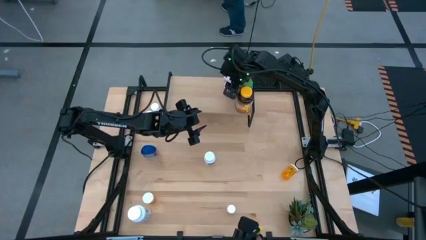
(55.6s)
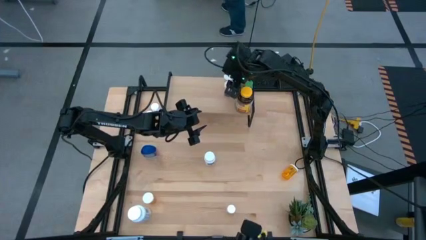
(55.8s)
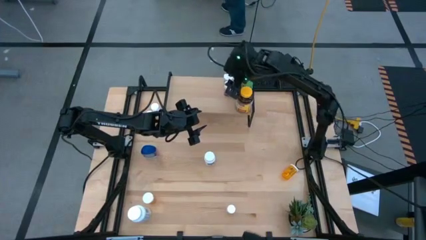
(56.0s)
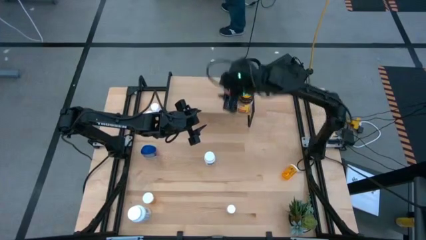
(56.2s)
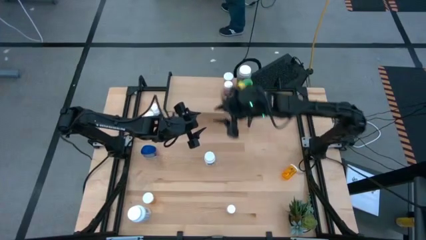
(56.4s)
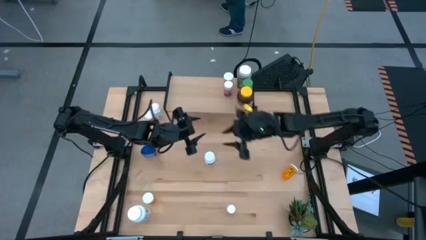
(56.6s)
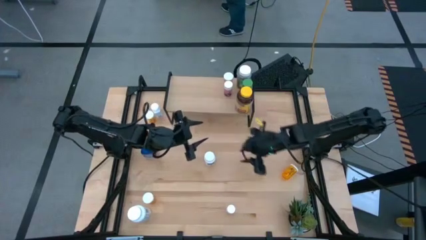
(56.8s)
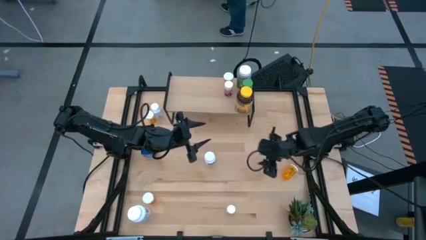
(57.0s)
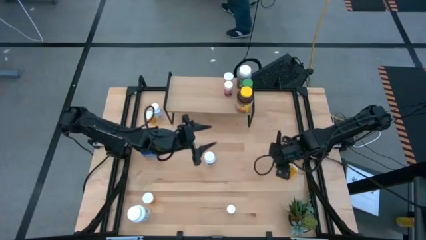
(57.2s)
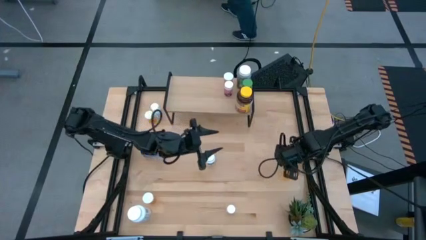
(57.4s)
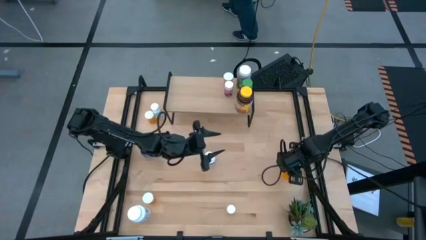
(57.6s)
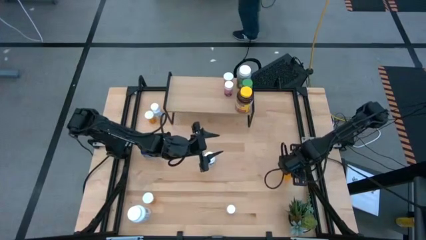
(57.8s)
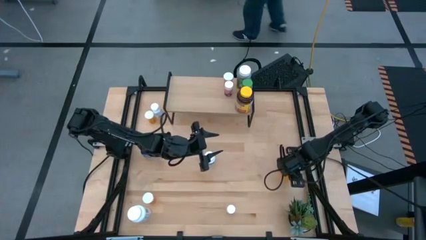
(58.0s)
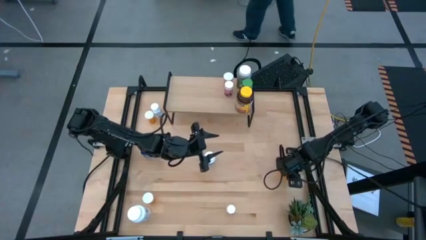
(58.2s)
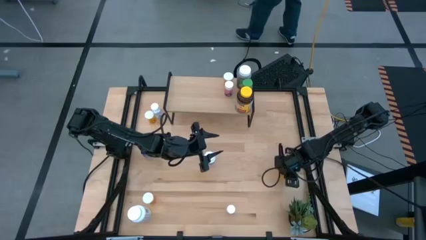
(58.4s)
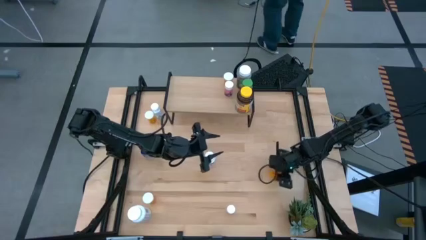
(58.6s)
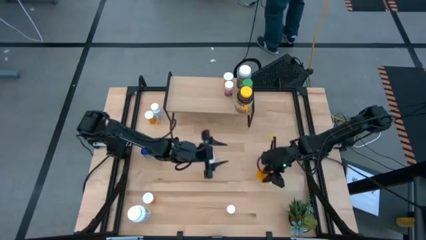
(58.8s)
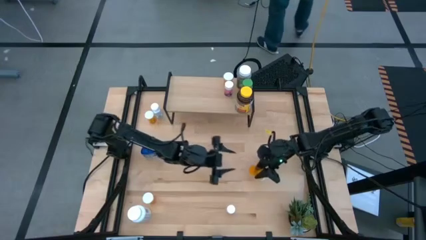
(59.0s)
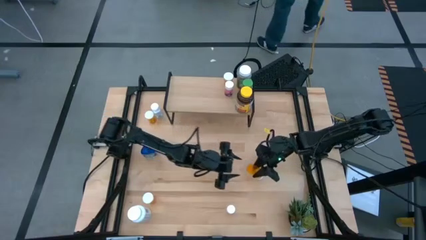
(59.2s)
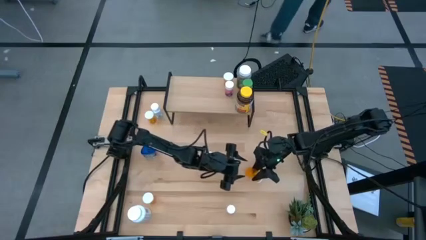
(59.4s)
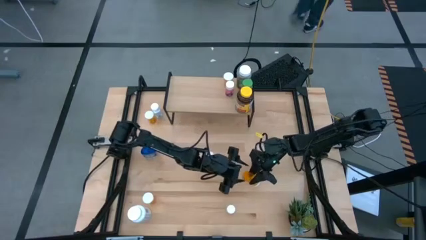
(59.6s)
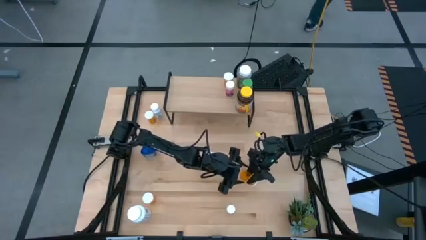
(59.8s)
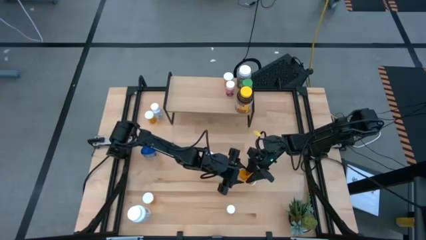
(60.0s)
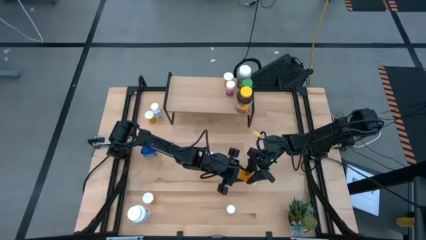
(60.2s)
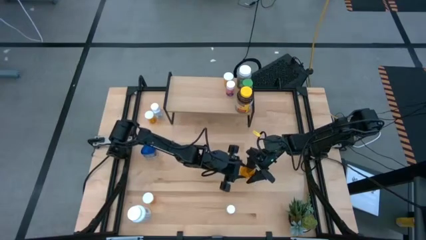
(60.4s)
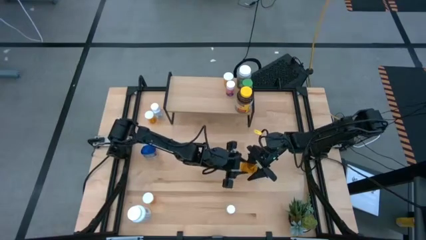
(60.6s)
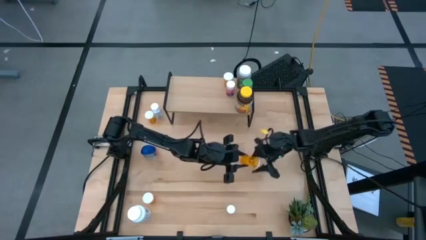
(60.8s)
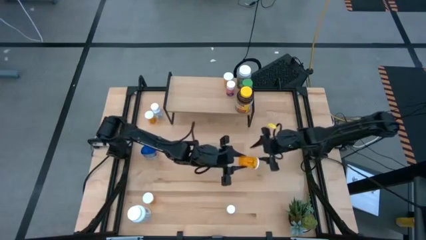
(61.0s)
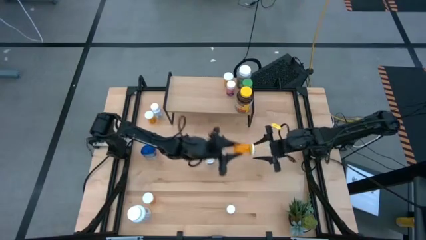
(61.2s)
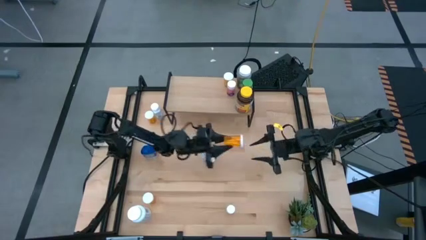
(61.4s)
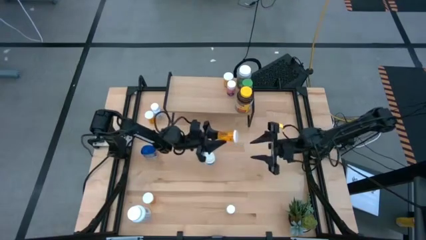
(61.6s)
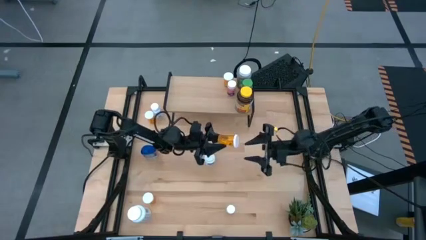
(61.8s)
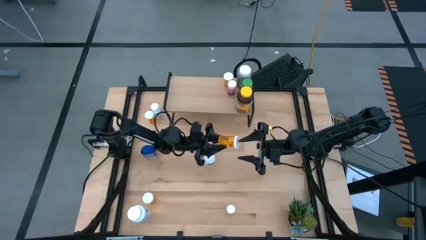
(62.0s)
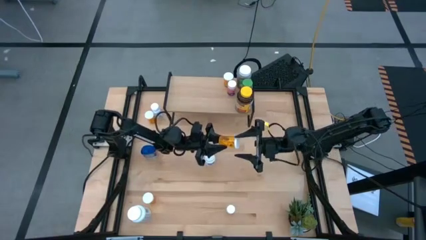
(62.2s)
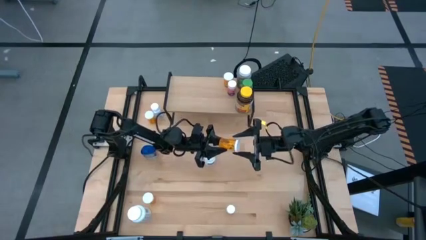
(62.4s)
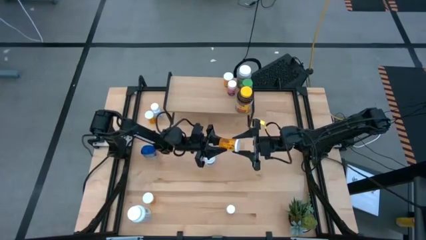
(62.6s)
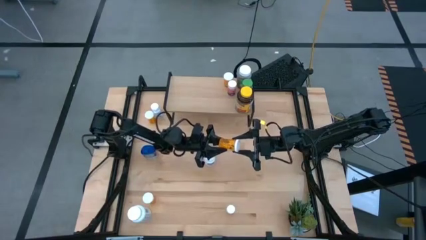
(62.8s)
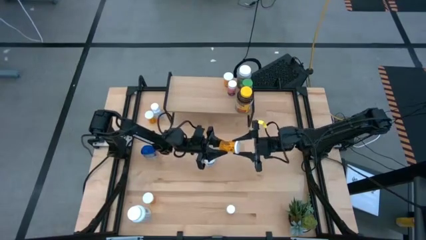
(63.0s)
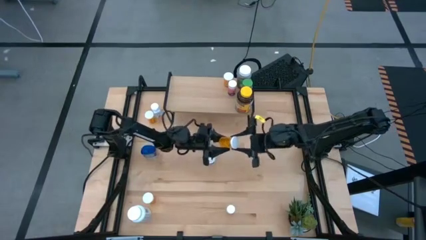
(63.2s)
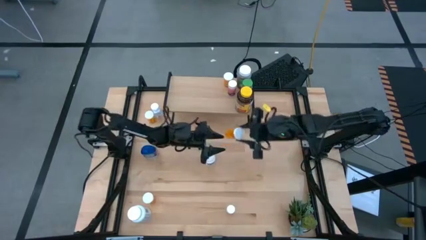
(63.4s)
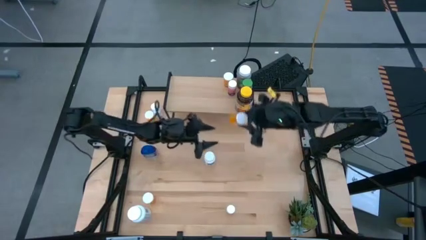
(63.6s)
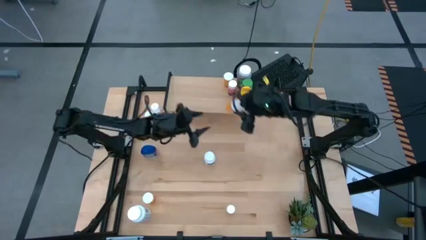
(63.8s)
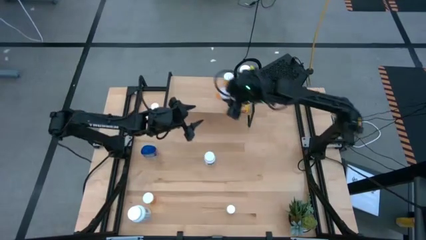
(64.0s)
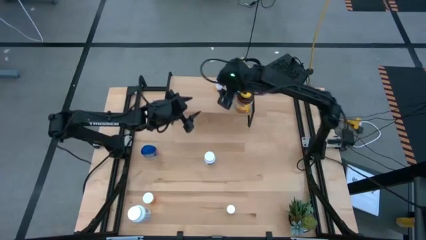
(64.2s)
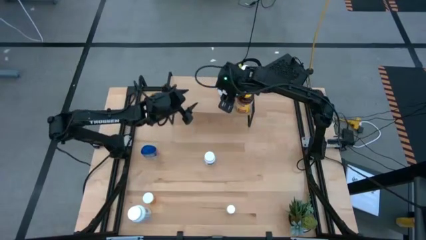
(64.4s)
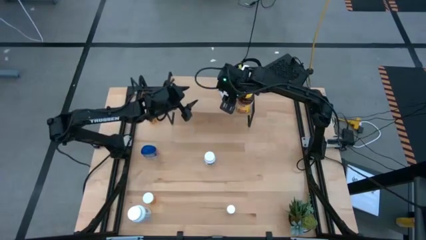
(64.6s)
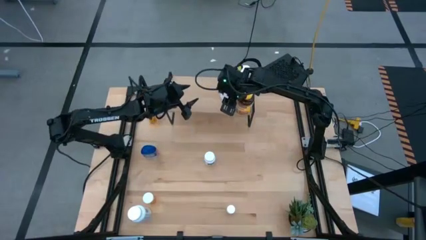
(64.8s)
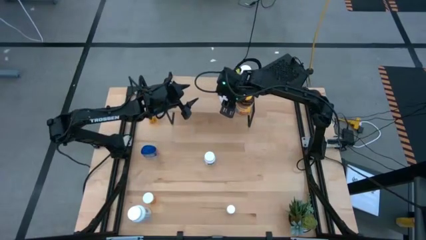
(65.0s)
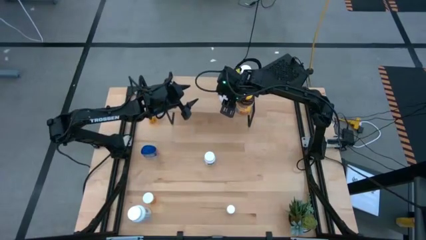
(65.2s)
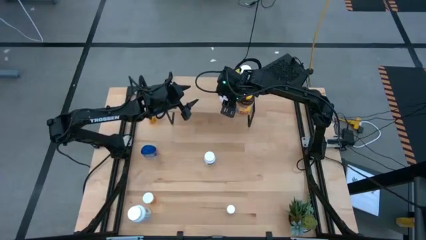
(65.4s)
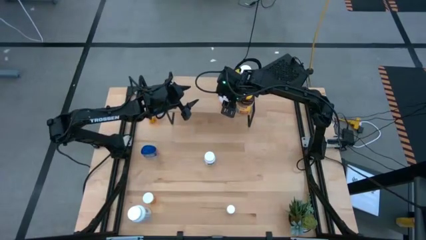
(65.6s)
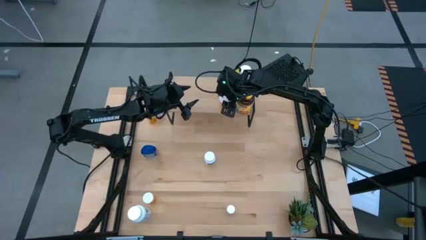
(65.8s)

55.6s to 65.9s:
Task: Pick and place medicine bottles onto shelf by color
Put the orange pill bottle on the shelf

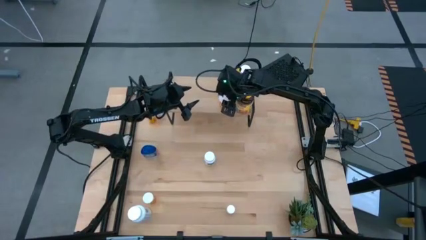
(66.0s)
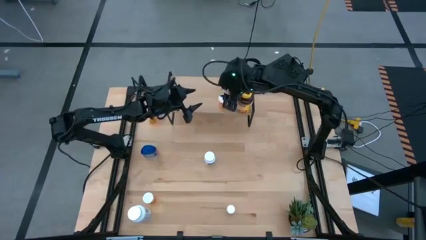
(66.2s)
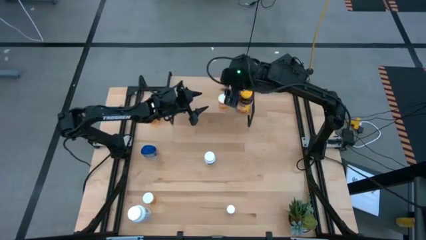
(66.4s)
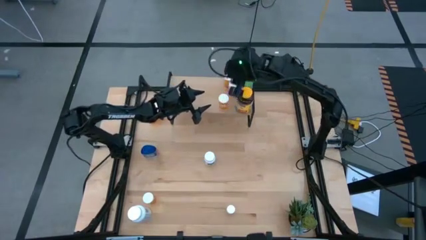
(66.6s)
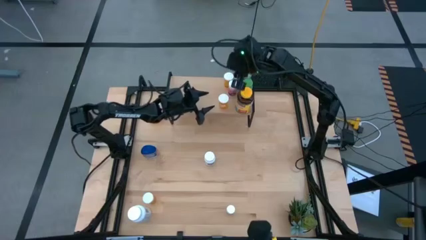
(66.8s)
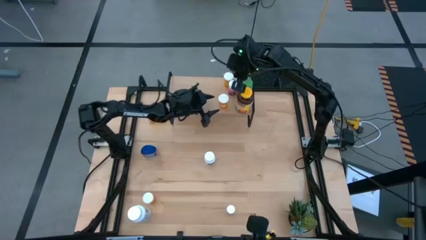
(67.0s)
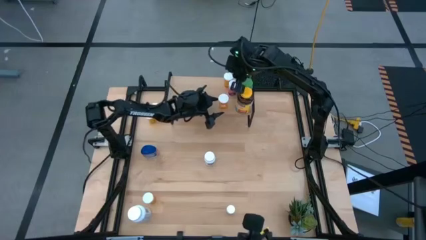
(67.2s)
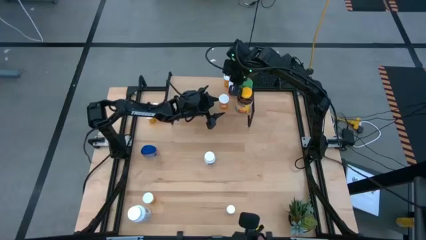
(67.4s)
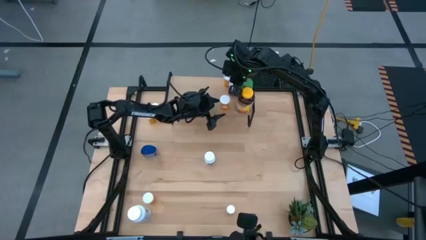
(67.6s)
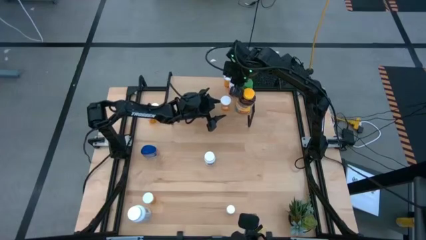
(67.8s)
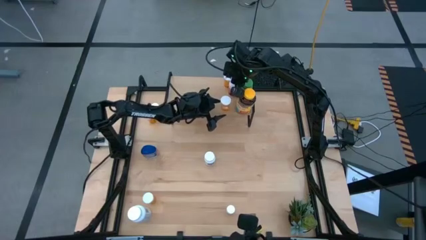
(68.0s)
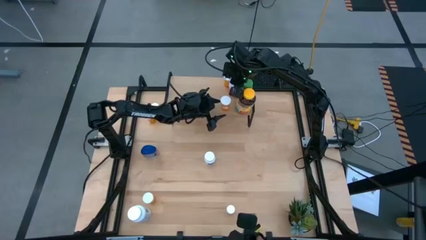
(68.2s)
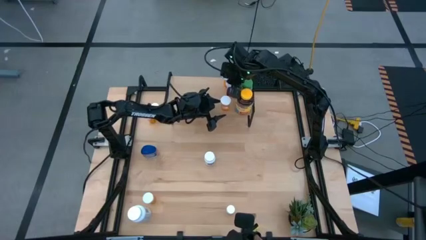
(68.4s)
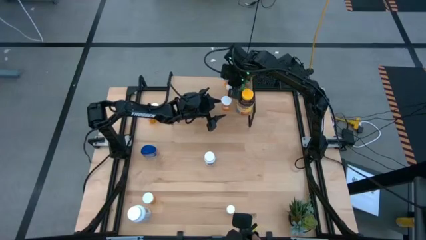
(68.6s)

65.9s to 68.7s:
Adjust the pill bottles on the shelf
